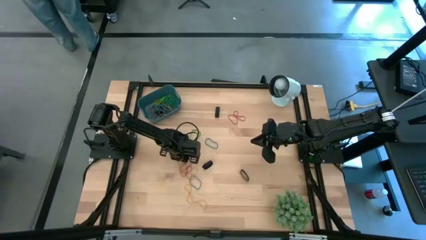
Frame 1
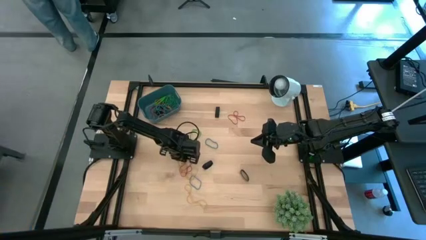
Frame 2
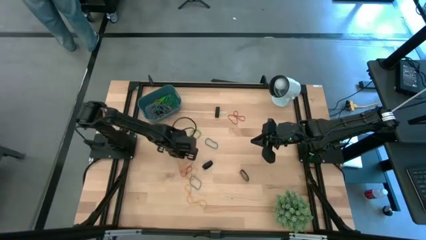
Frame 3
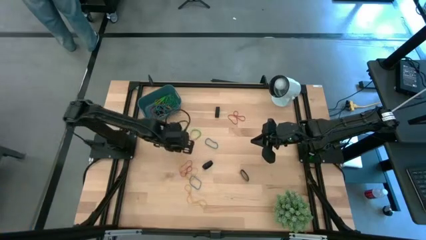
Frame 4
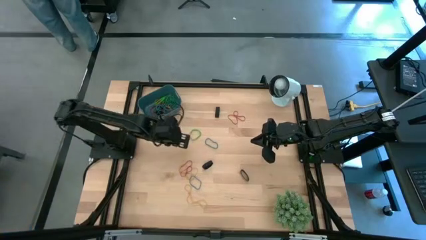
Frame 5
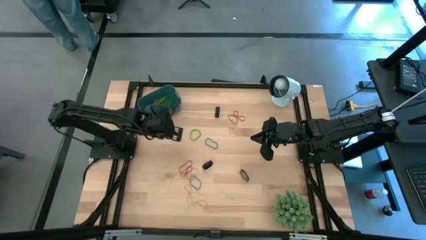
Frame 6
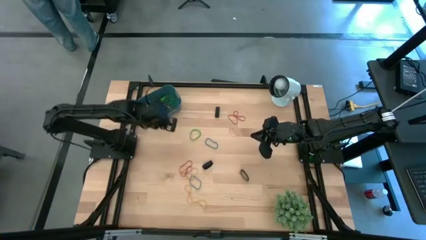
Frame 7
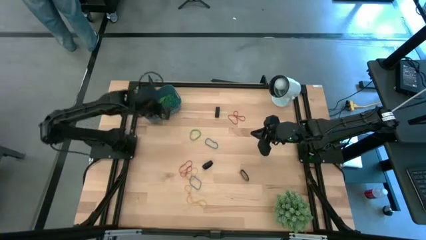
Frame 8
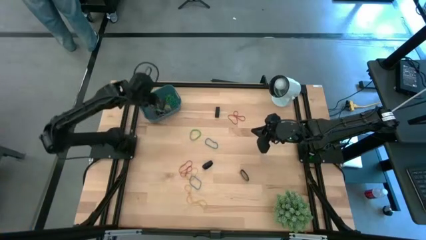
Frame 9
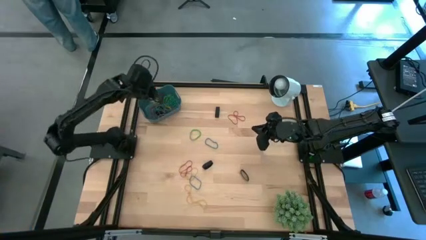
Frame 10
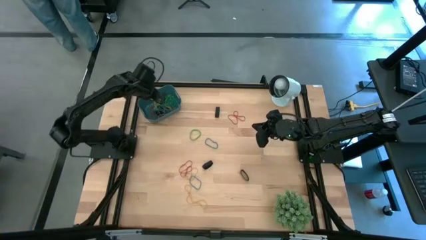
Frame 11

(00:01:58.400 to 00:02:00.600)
Task: Pick and place rubber bands into bin
Put the top yellow rubber band into the bin

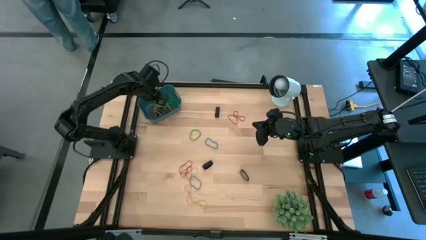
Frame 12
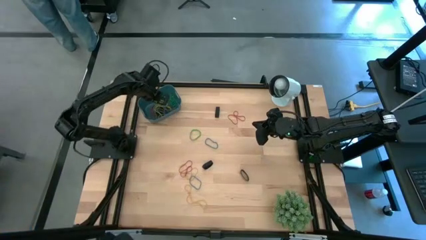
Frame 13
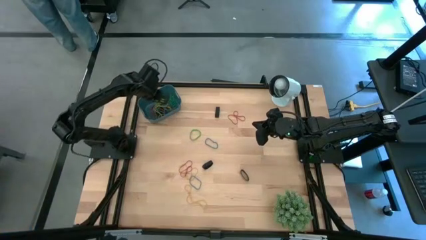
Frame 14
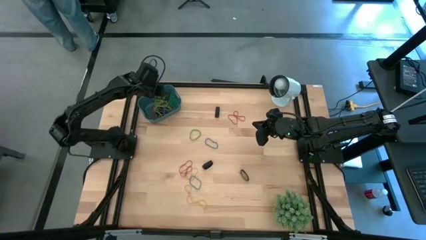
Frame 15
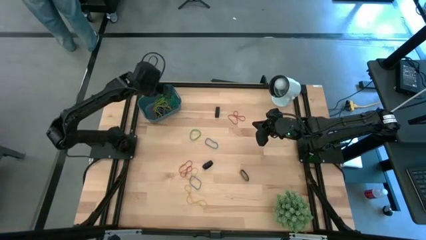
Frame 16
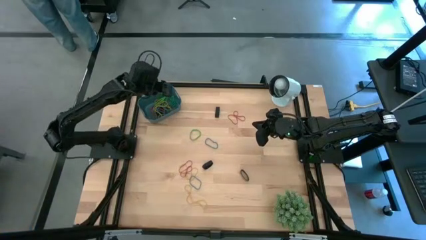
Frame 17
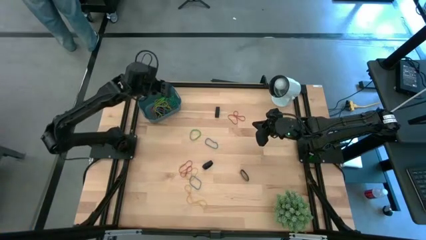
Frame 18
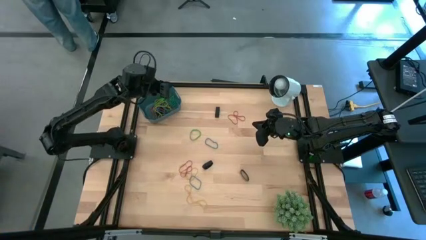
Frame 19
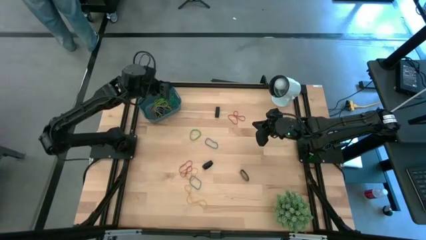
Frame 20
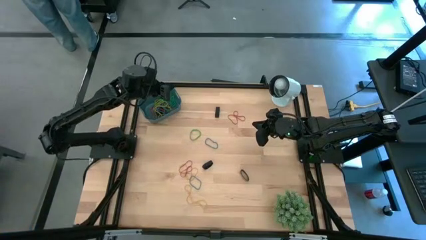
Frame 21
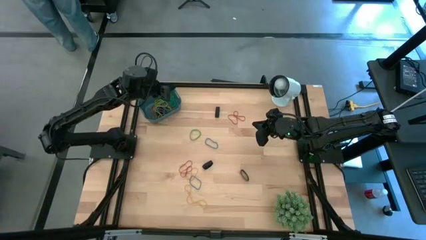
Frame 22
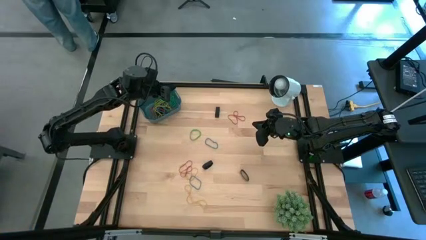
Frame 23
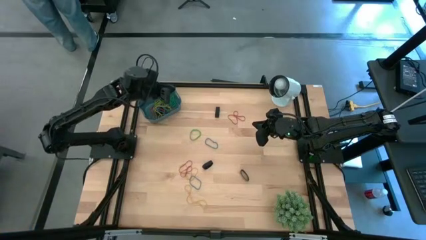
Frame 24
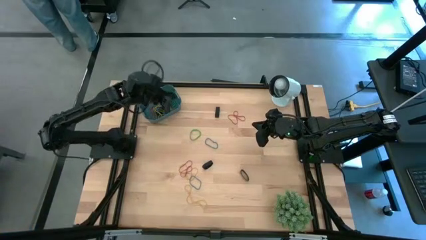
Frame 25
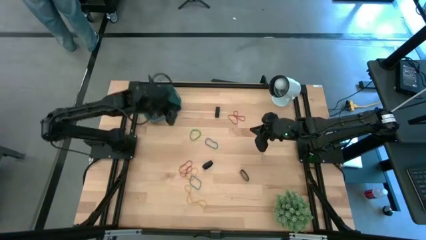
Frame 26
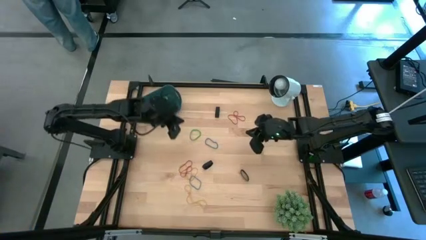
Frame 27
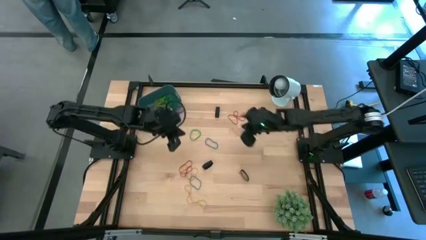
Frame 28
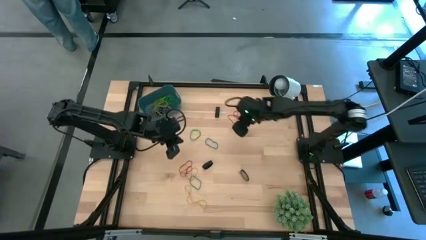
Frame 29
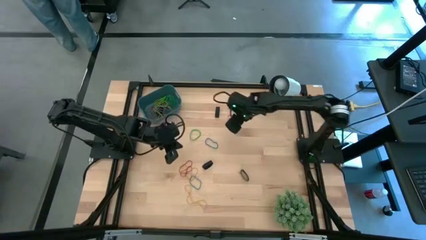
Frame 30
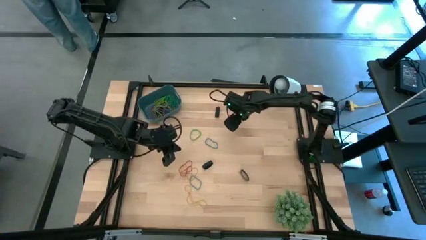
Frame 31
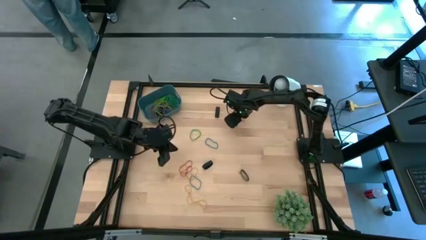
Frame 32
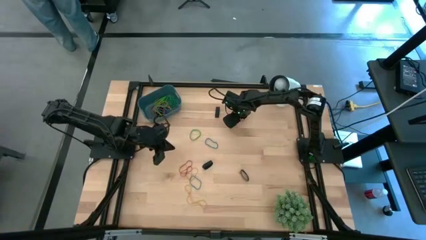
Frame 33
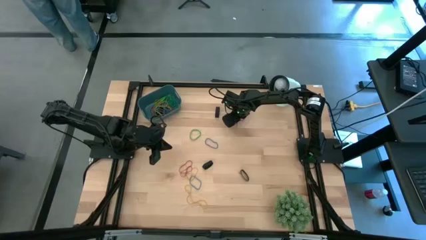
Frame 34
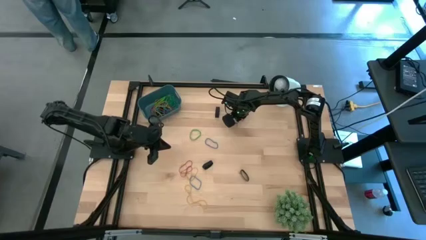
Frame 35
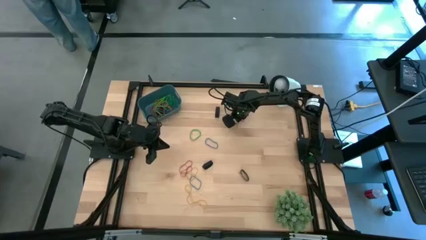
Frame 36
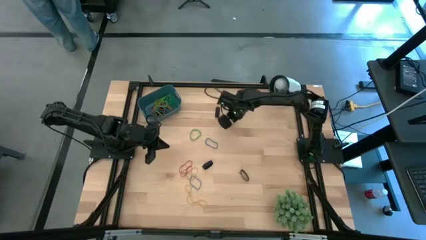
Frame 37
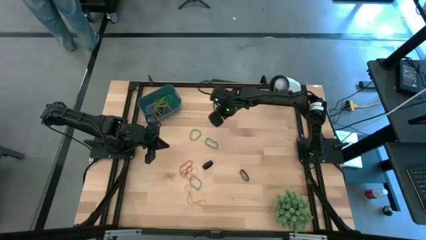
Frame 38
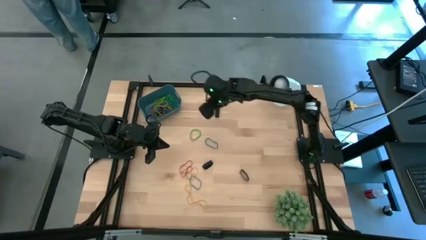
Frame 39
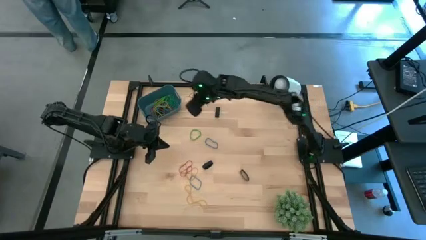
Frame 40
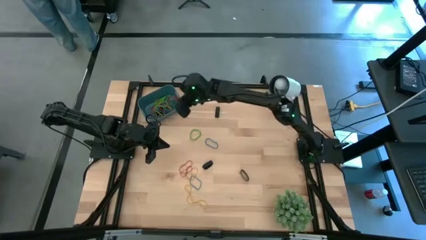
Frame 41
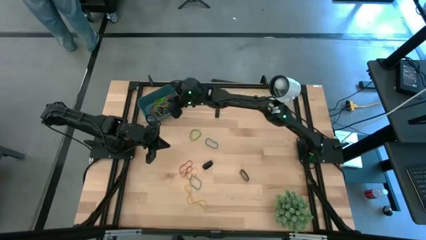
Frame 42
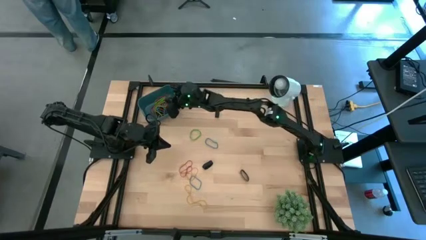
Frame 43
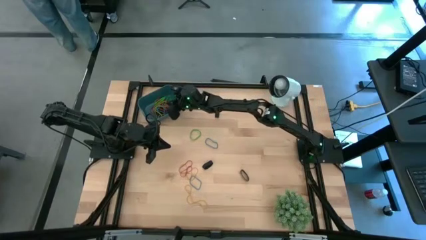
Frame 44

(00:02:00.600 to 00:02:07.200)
Put the top red rubber band into the bin

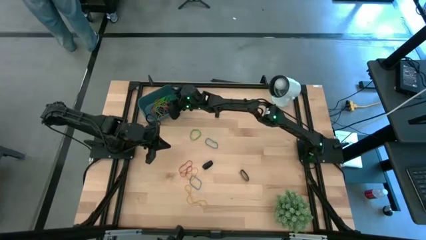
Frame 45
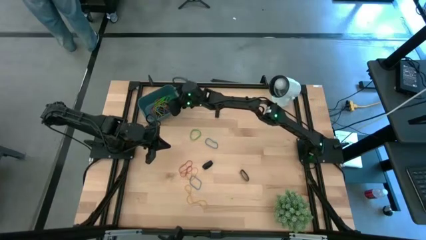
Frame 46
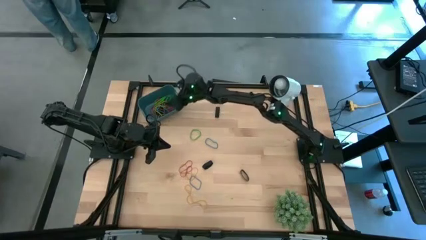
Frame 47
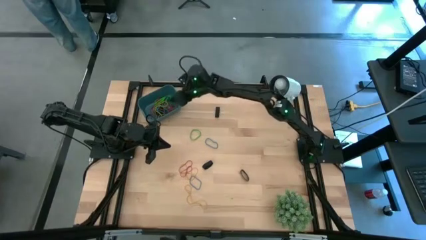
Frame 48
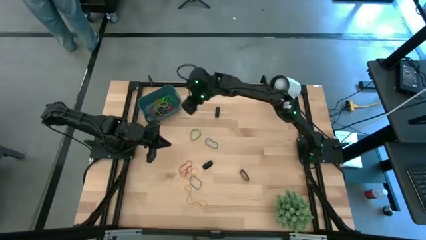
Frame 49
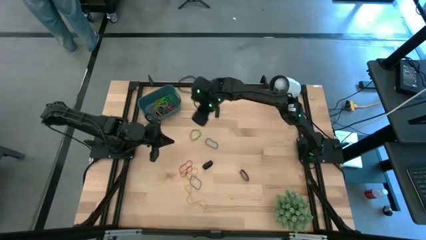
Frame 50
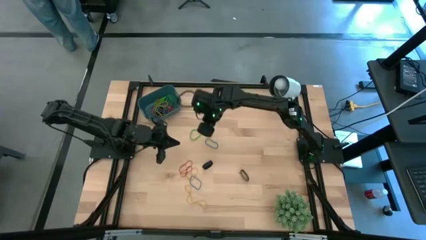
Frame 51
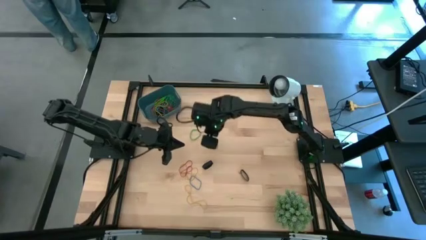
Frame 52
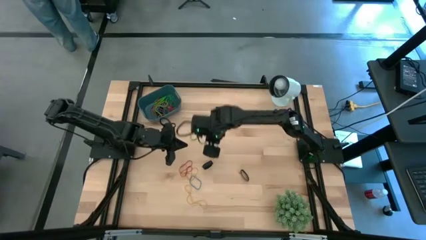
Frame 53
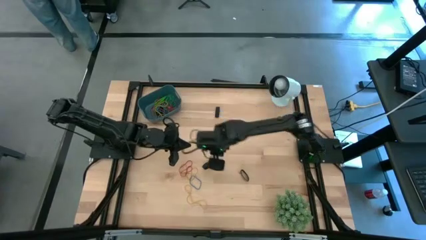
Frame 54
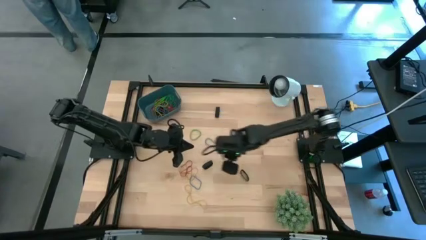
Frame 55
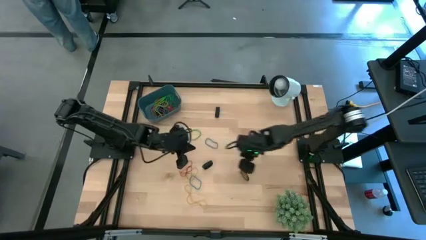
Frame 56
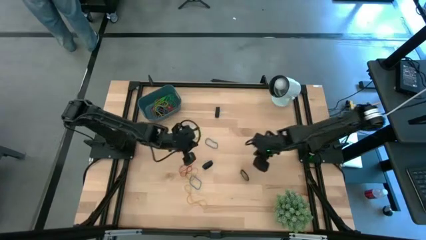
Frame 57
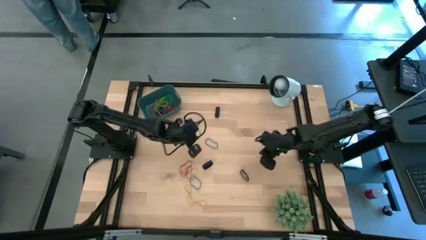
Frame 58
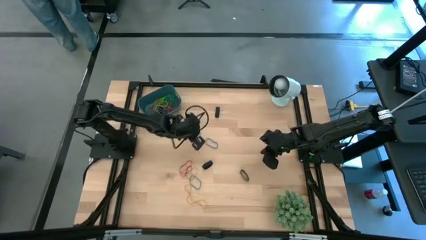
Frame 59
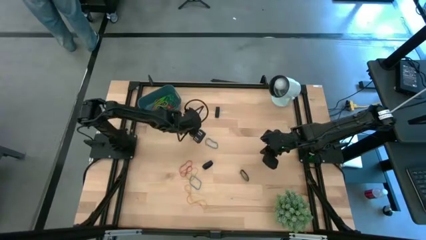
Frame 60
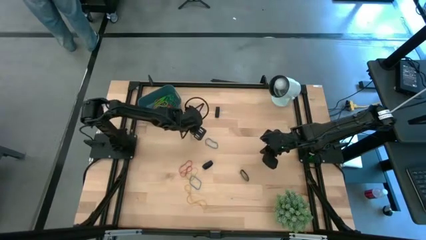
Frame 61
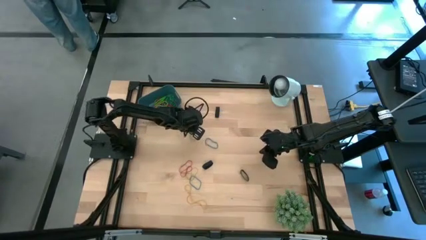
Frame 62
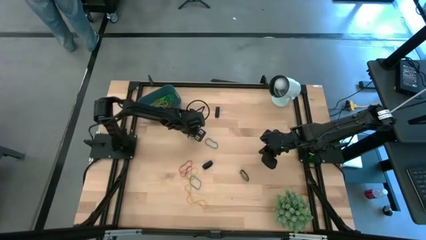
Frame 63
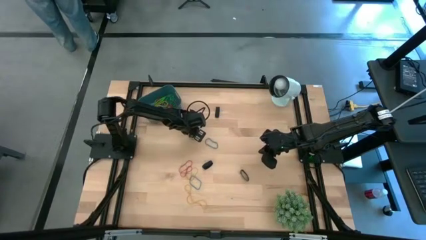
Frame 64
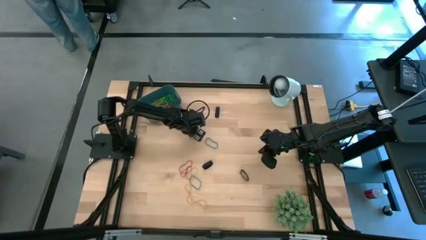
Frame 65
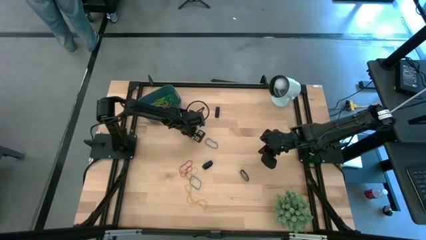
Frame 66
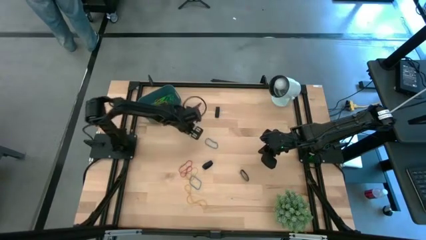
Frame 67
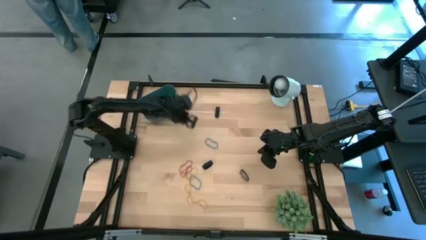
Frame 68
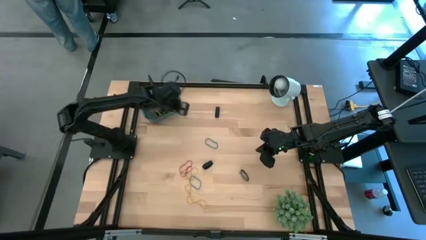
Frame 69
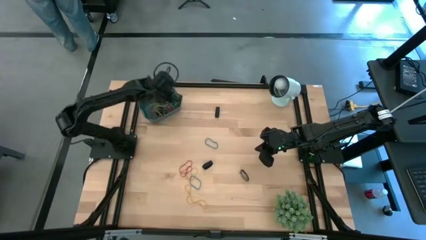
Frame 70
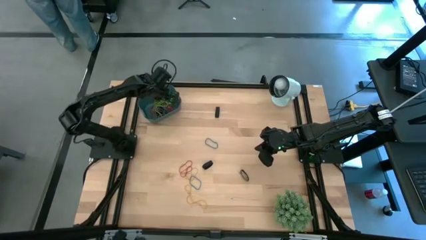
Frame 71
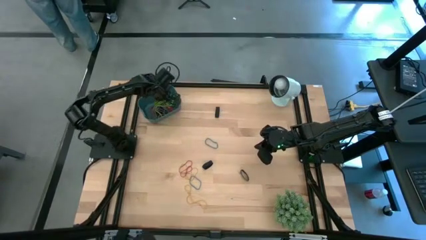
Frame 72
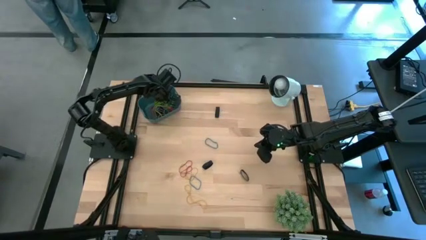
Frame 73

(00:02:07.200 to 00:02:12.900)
Put the green rubber band into the bin

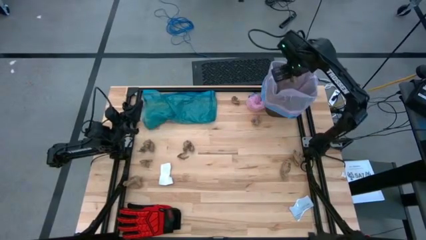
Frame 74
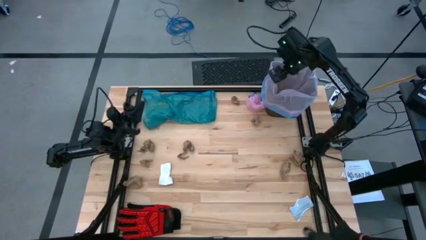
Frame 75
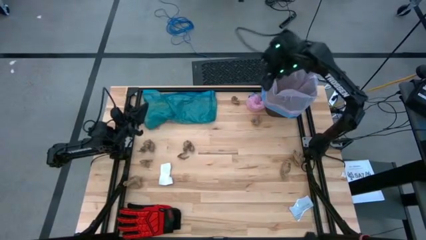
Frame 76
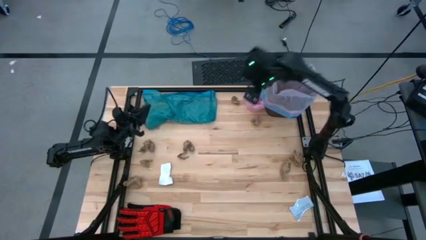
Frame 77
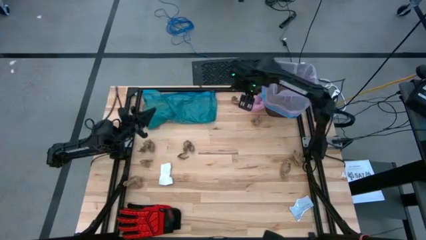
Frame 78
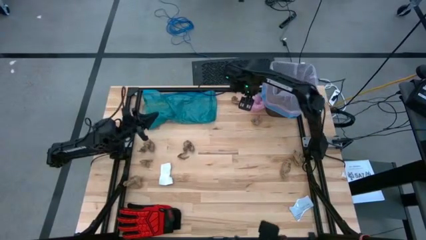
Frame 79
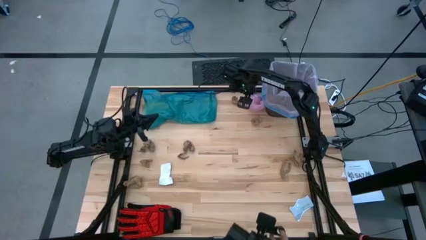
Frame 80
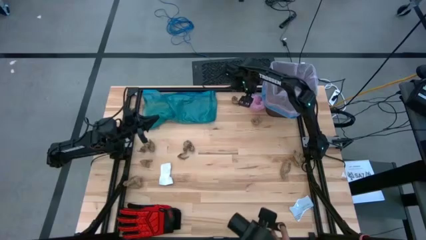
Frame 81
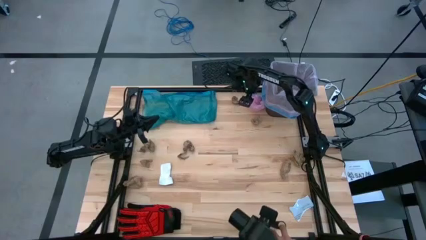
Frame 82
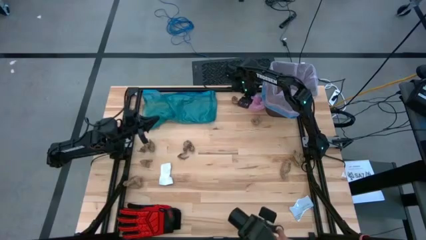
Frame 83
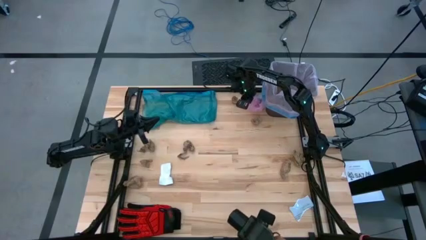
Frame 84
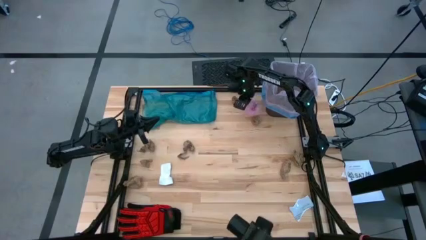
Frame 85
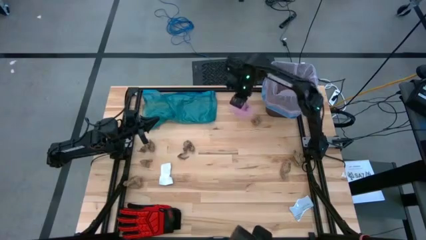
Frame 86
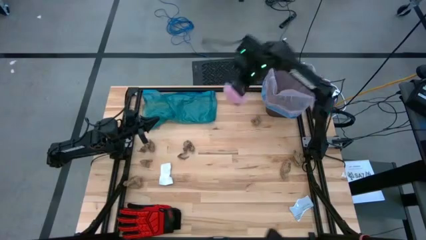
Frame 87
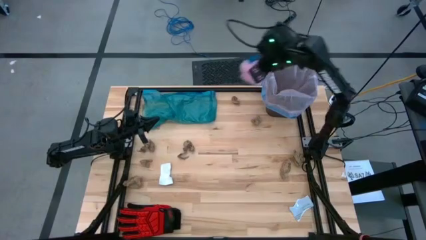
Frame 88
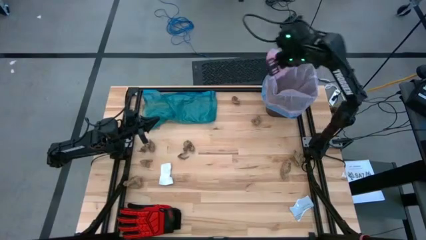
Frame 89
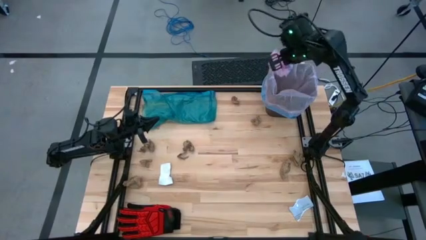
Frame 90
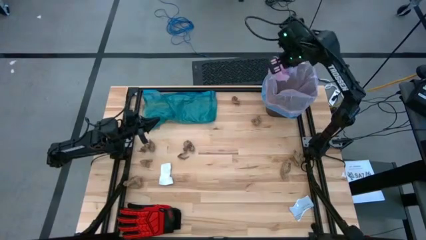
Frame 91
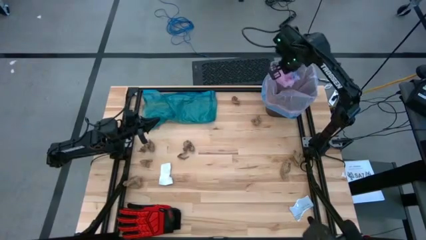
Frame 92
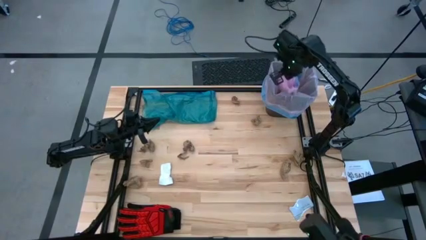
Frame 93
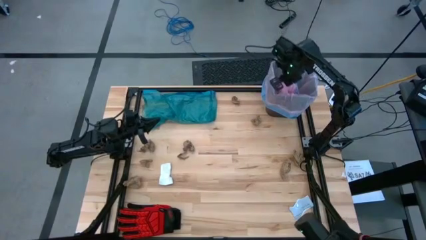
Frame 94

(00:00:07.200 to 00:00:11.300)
Task: place trash/remove bag and relplace
Put the pink trash bag into the black trash bin
